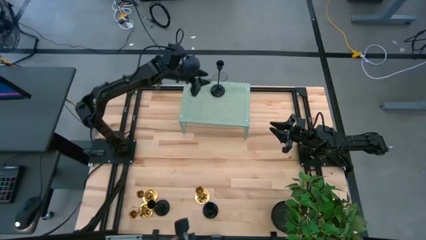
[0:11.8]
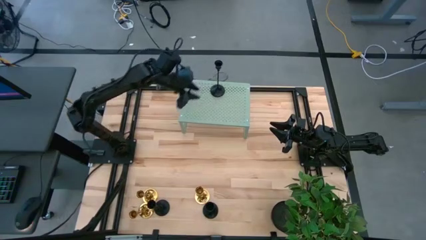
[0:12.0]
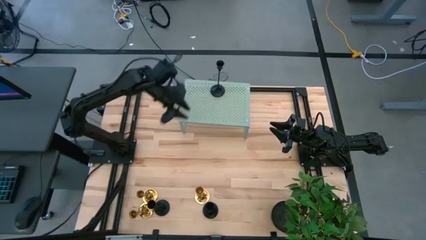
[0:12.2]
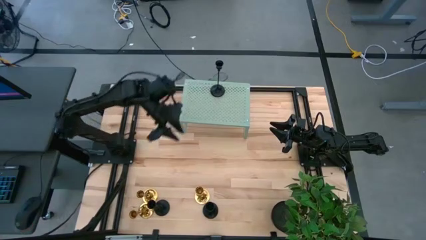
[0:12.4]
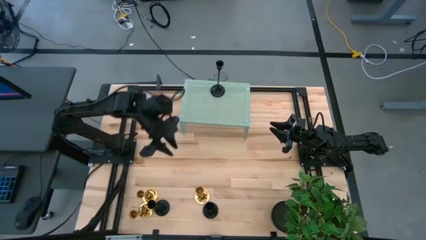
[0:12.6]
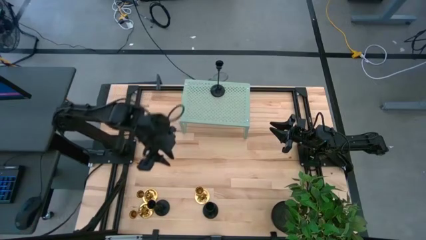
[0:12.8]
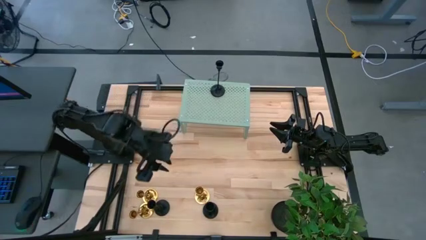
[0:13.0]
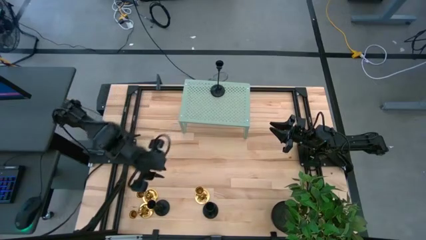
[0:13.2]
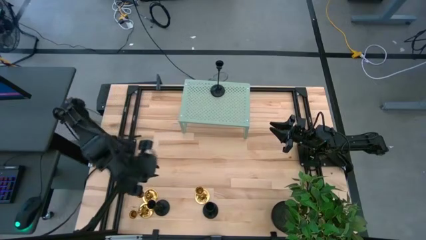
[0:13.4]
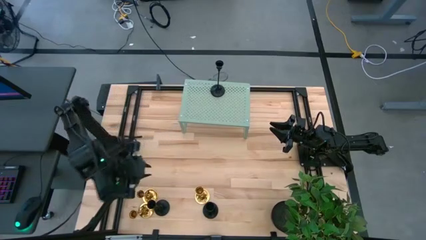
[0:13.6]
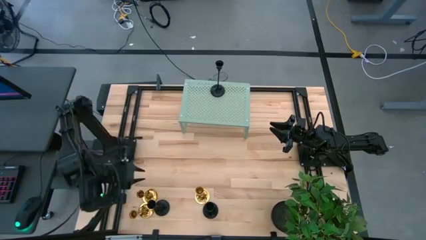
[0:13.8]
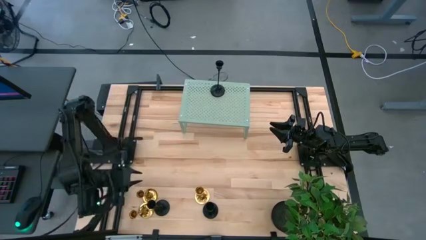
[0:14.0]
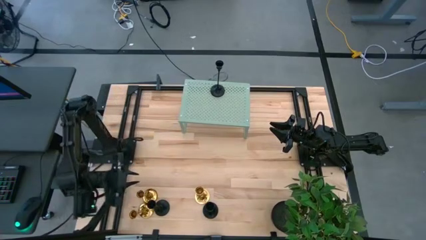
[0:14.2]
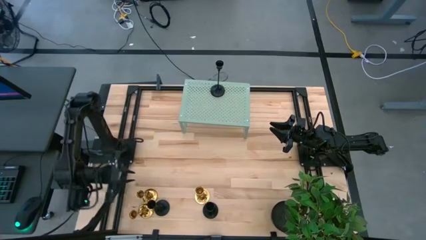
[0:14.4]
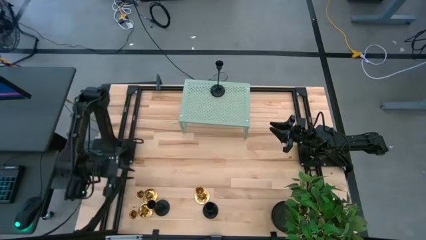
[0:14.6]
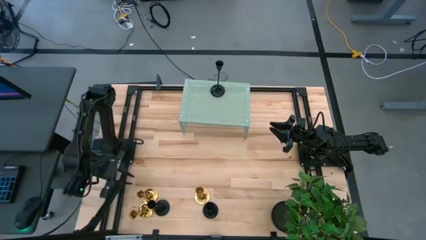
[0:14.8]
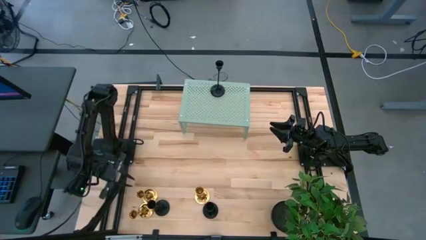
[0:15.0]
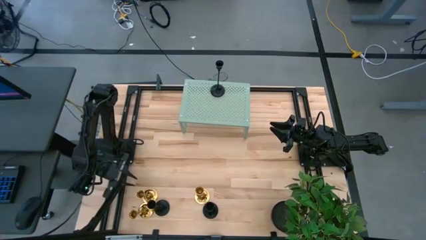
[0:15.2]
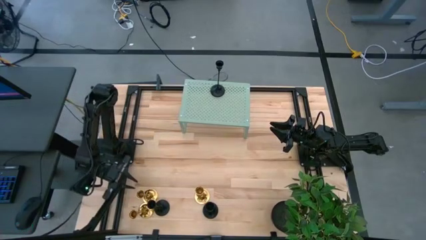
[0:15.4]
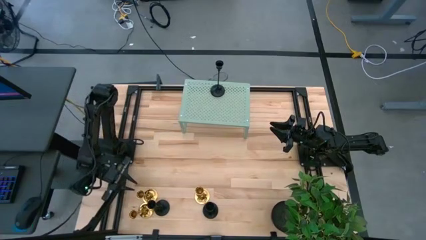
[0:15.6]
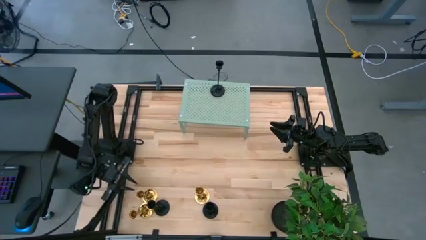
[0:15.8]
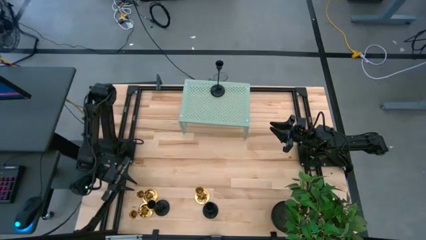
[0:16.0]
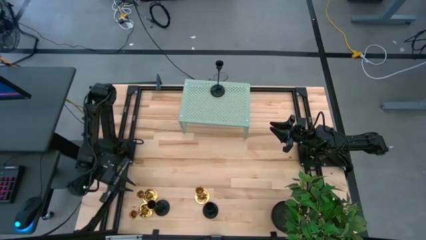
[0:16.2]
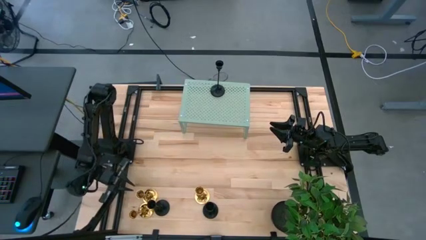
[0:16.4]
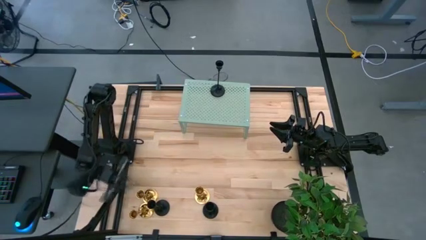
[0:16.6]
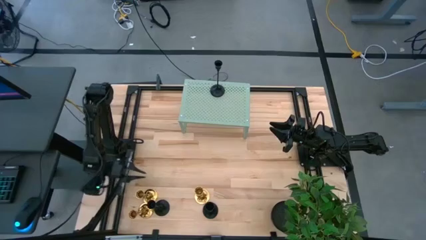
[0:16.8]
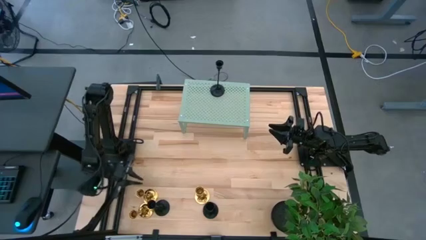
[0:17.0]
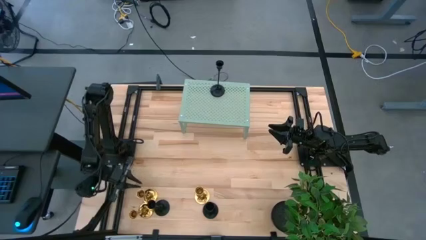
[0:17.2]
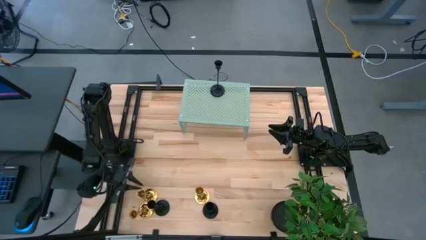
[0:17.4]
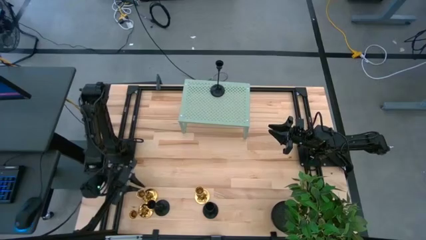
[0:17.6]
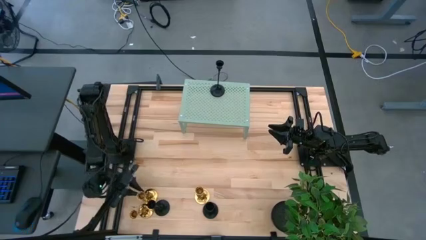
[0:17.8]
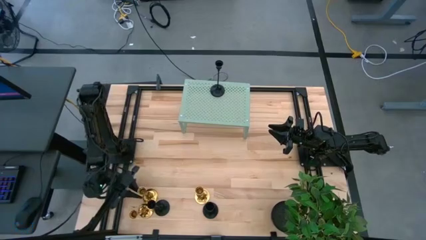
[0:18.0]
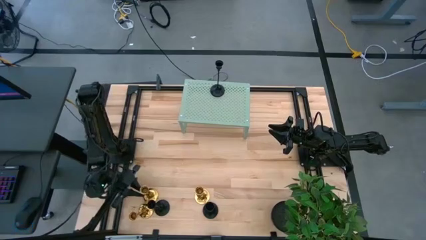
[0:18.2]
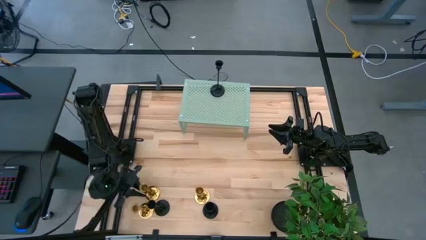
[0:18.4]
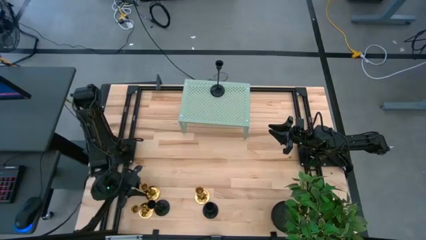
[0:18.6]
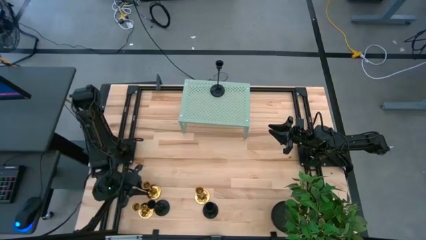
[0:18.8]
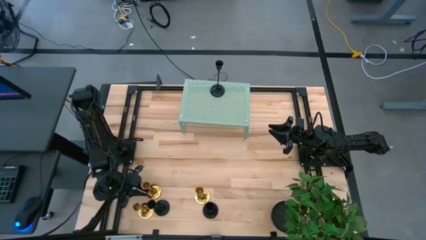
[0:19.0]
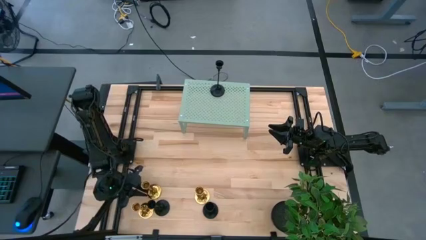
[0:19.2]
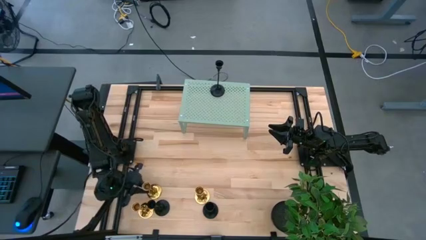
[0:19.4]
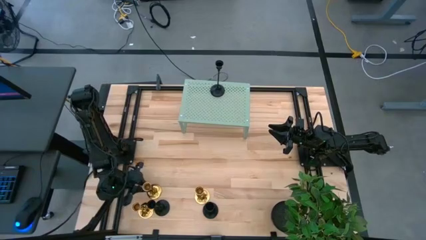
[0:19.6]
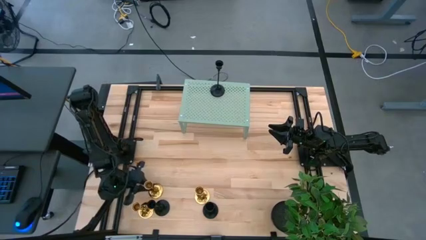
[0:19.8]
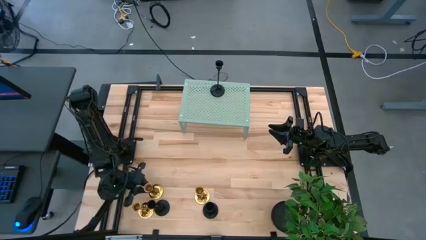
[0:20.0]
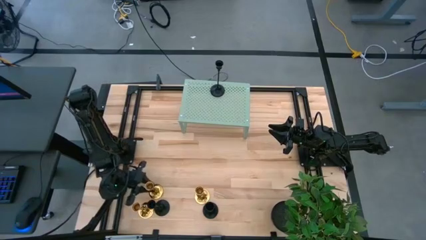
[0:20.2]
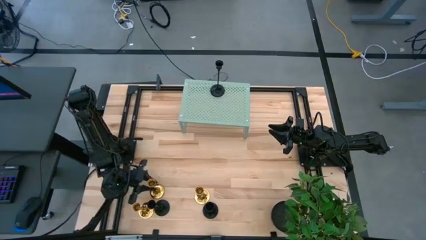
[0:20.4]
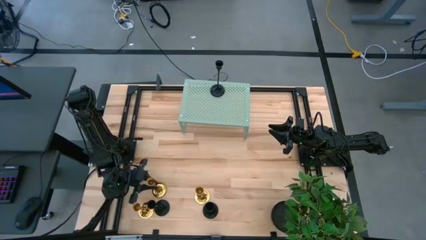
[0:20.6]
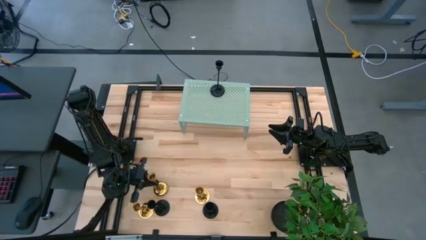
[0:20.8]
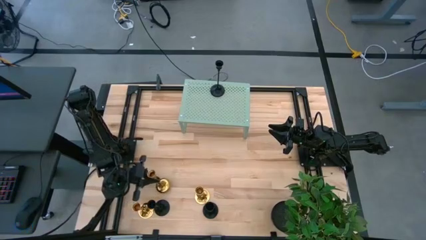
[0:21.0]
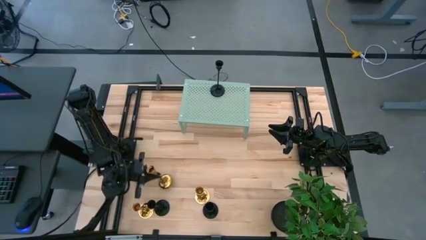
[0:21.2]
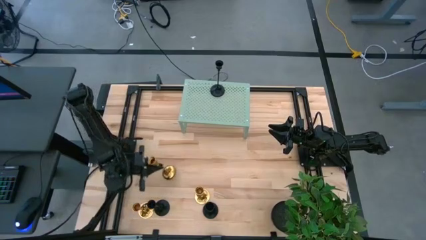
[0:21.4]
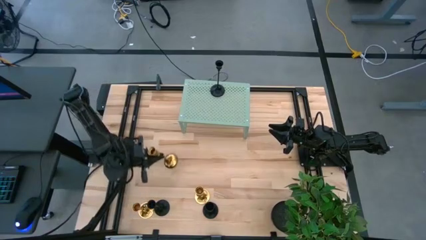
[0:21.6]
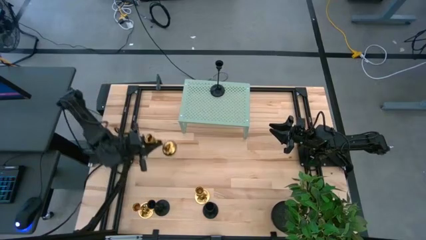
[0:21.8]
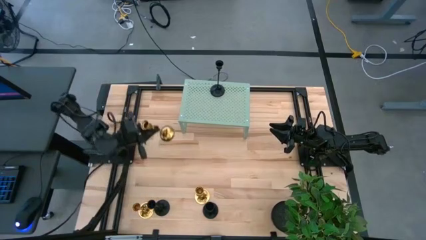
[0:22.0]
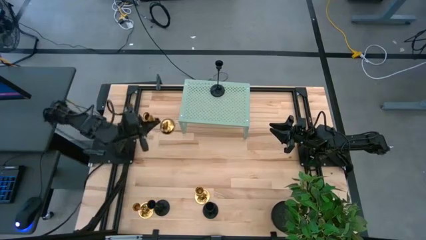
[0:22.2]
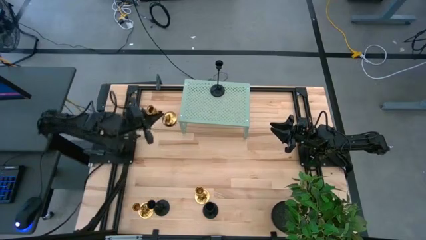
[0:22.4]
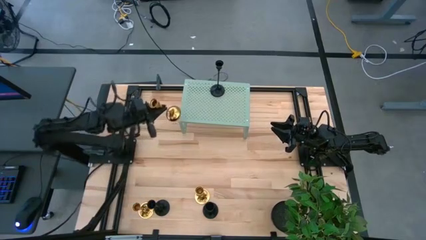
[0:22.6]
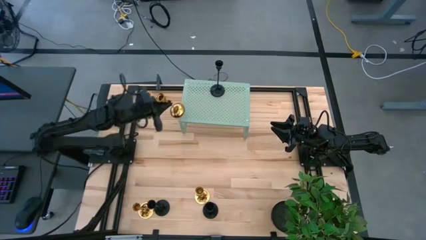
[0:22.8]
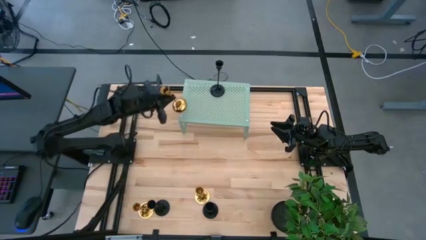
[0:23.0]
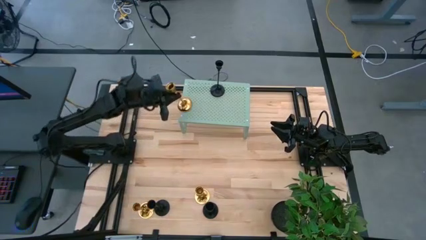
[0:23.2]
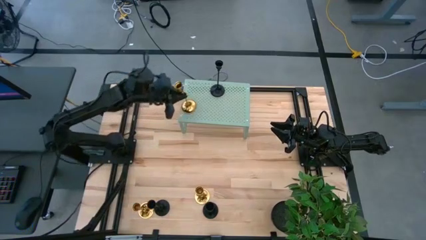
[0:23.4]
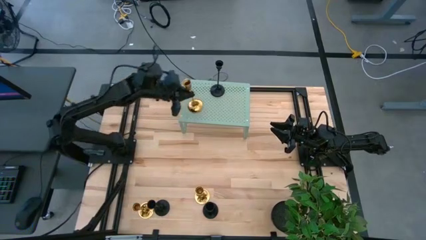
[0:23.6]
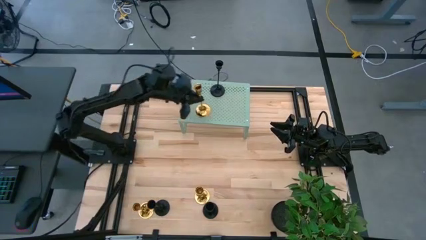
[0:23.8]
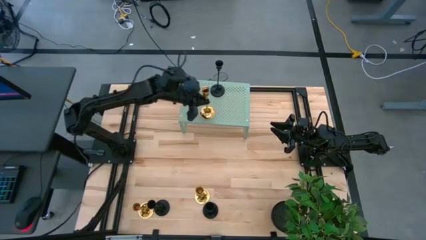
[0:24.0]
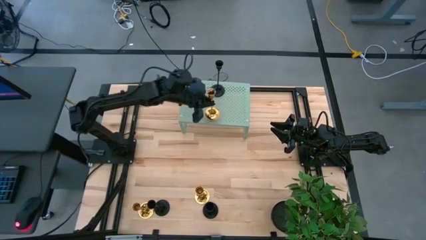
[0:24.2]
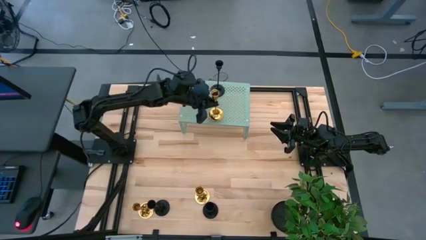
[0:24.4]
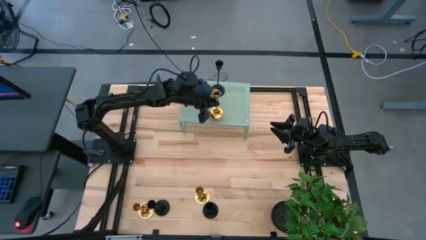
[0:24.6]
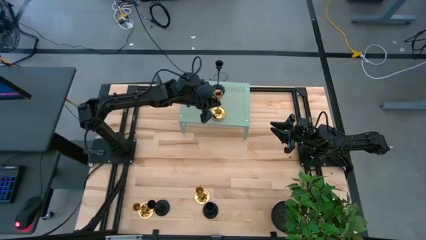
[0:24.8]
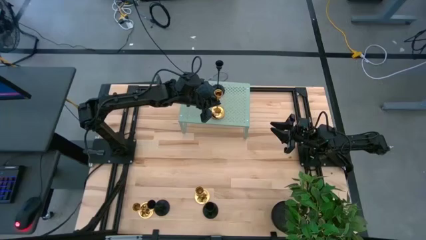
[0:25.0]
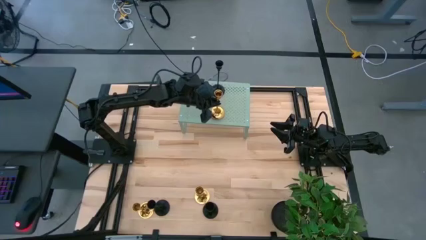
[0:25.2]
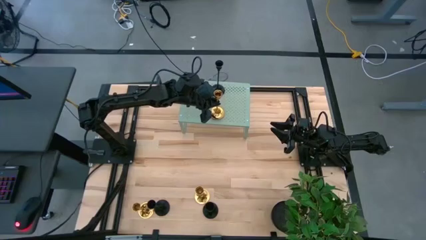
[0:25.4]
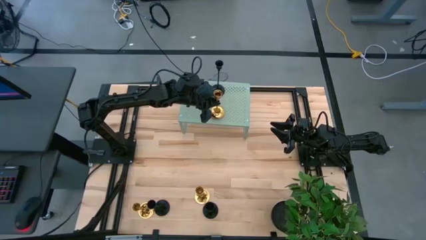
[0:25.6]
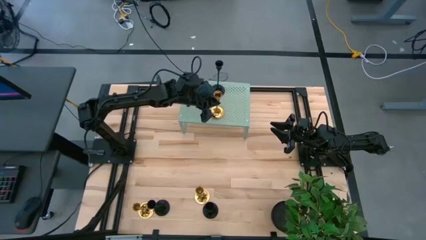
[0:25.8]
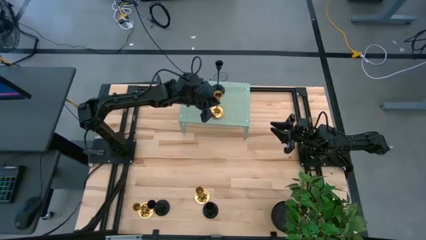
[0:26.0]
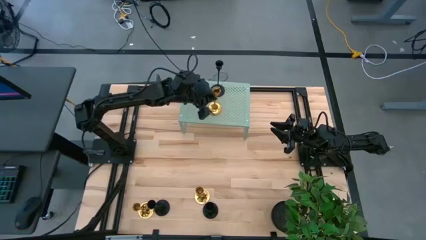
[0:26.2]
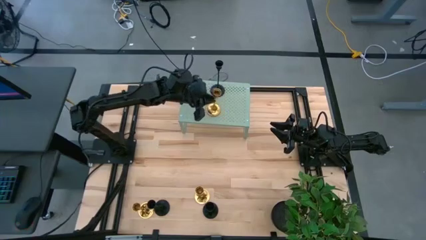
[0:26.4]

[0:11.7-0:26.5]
Task: Pick & Place candle stick holders
Put the top left gold candle holder on the shelf

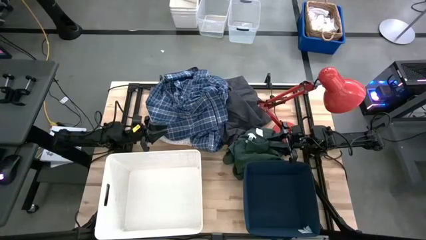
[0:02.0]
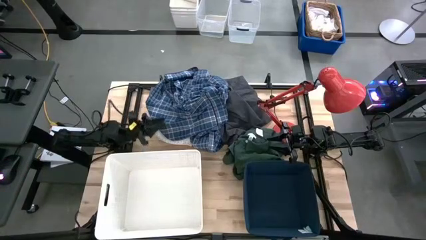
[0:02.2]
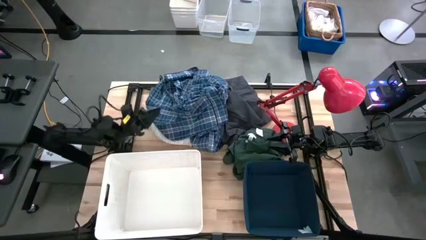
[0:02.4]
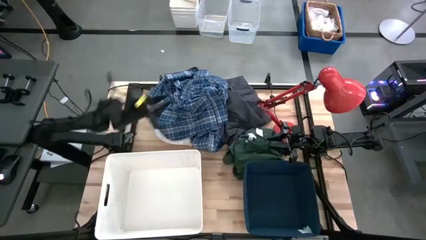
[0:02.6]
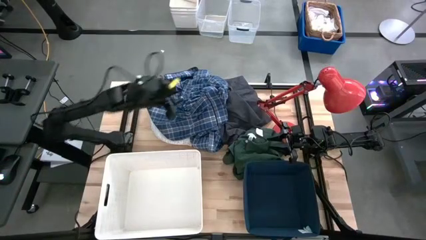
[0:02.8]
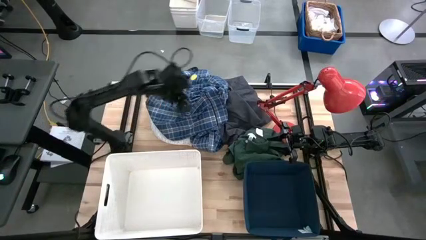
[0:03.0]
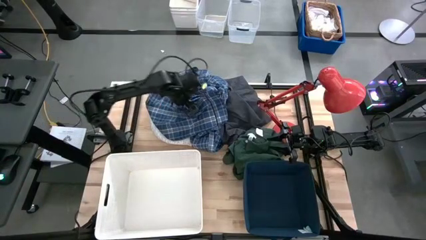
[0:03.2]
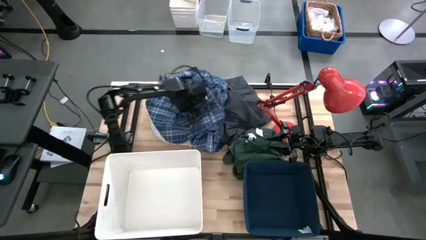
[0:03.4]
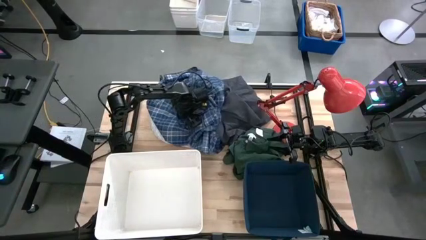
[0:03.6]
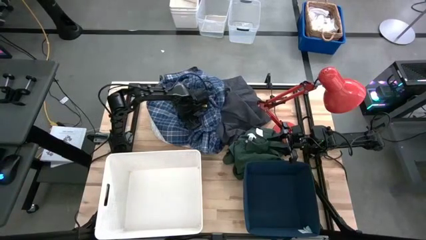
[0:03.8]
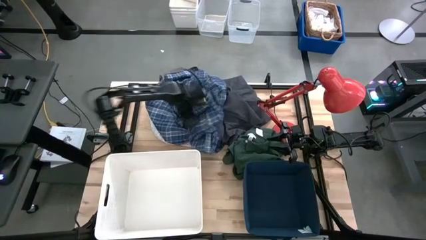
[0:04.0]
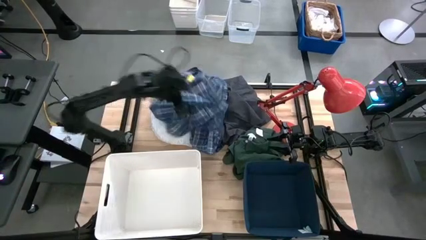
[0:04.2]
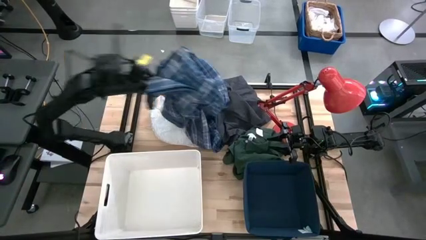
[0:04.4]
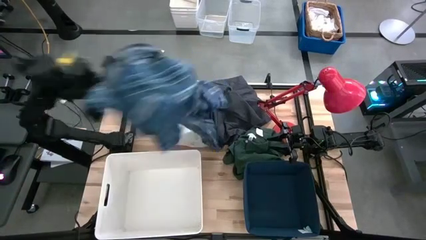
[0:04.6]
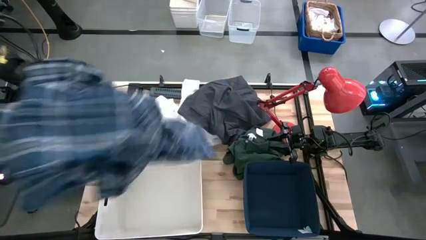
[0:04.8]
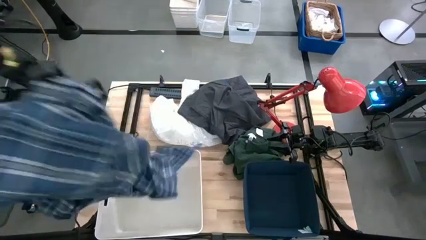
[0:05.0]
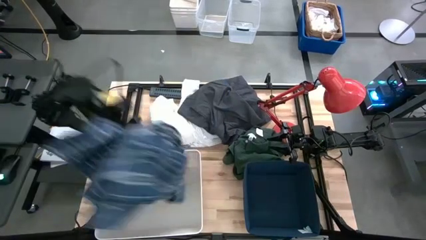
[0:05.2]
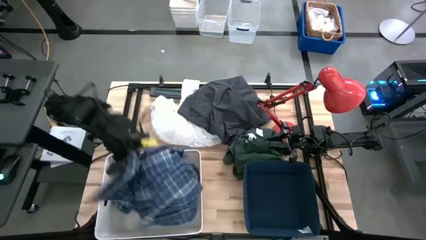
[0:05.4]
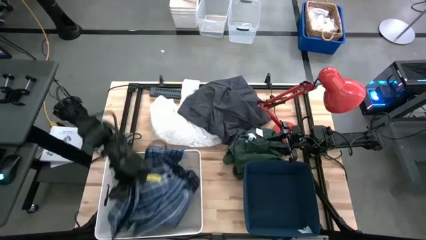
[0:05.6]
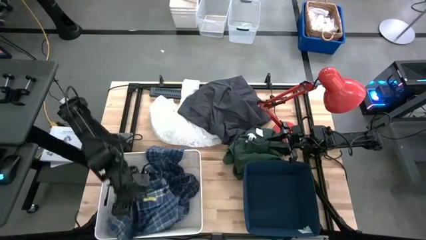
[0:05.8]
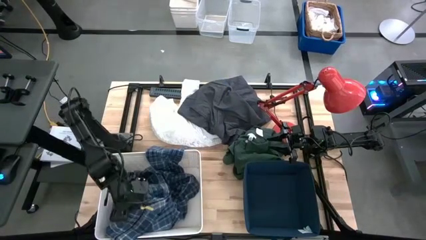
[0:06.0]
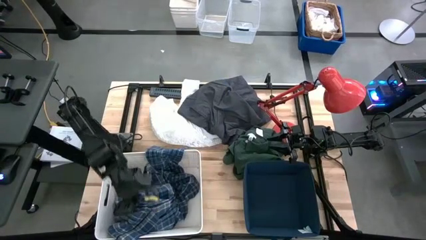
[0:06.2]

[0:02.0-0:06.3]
Task: Sort clothes
Put the blue checkered pajamas into the white bin
